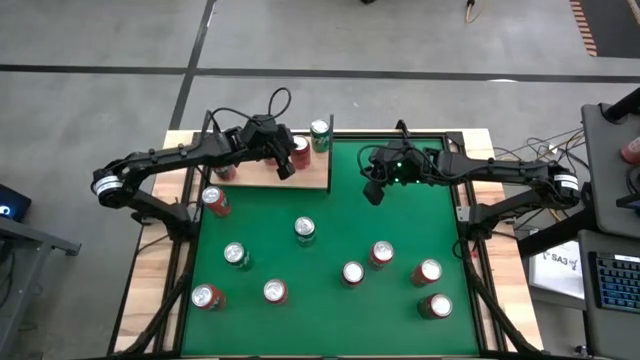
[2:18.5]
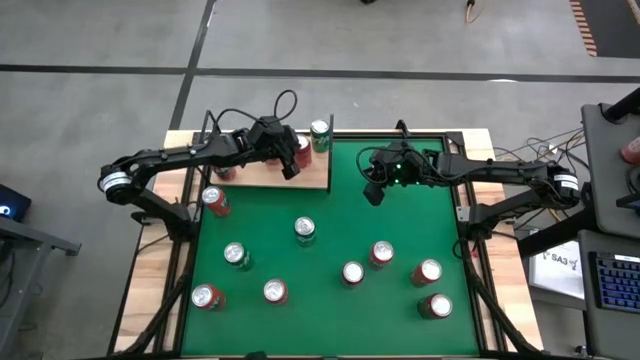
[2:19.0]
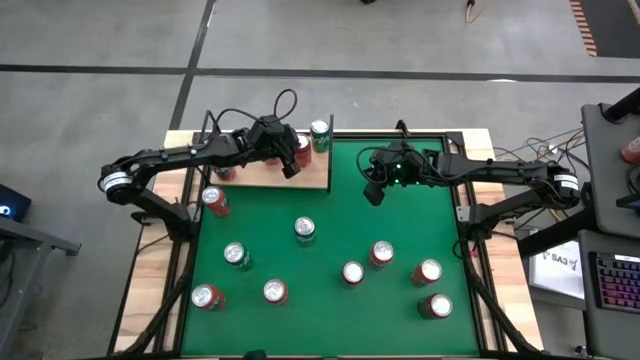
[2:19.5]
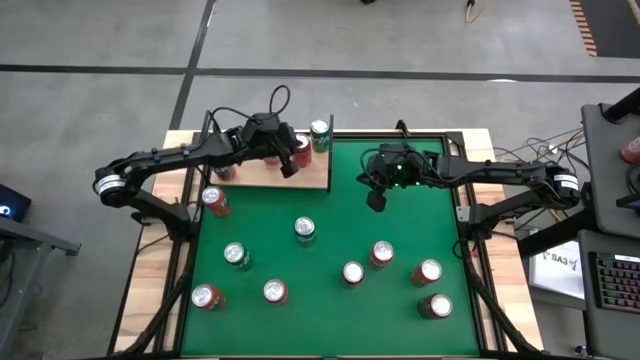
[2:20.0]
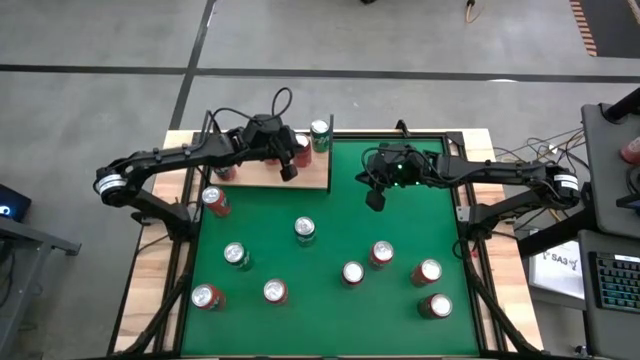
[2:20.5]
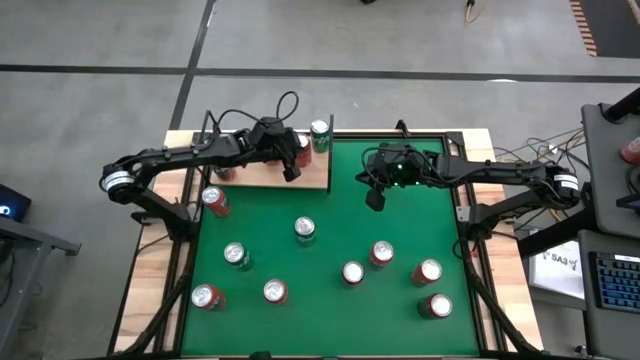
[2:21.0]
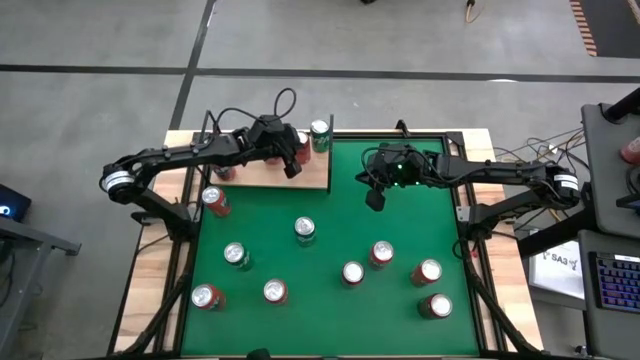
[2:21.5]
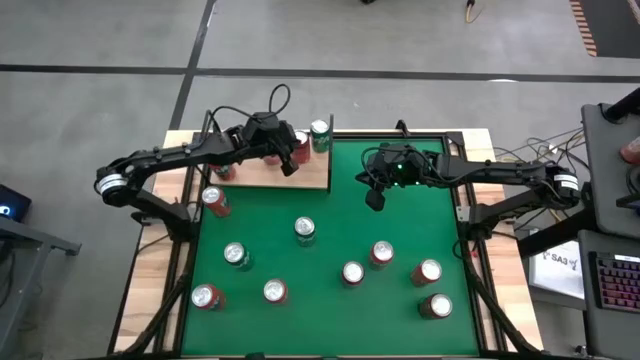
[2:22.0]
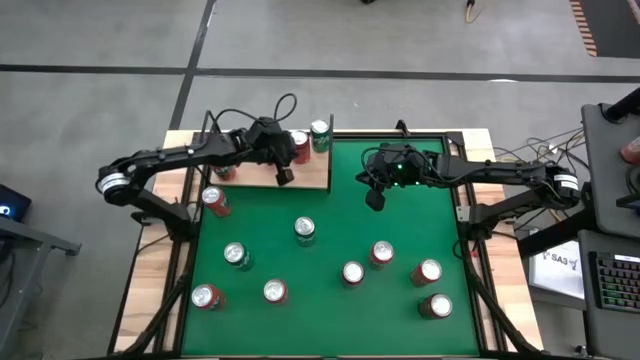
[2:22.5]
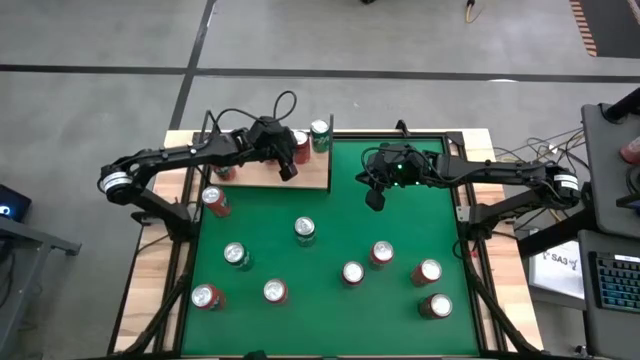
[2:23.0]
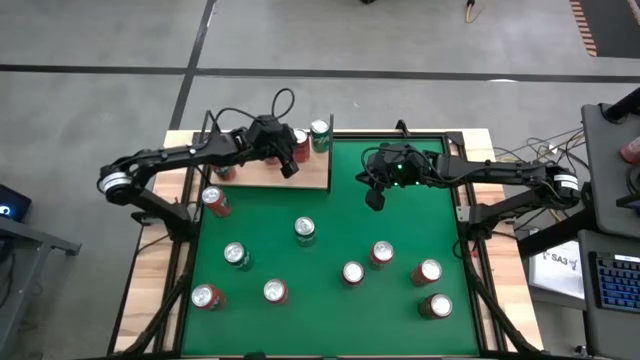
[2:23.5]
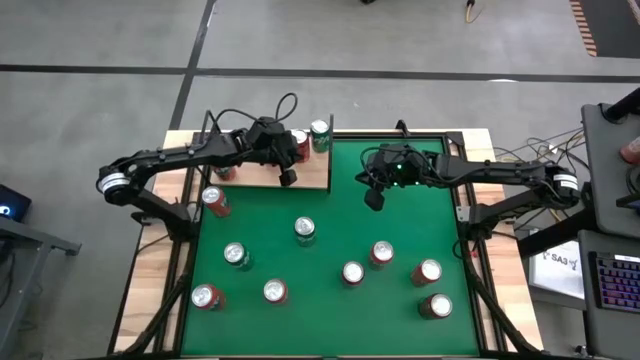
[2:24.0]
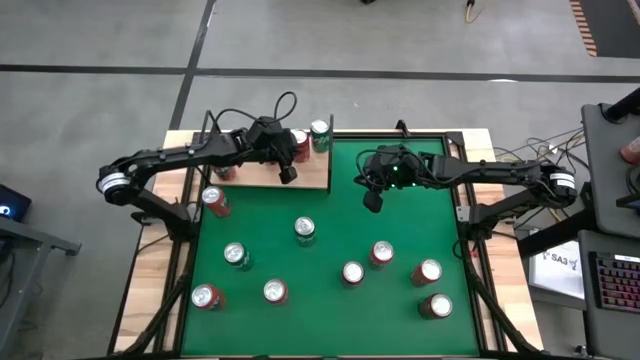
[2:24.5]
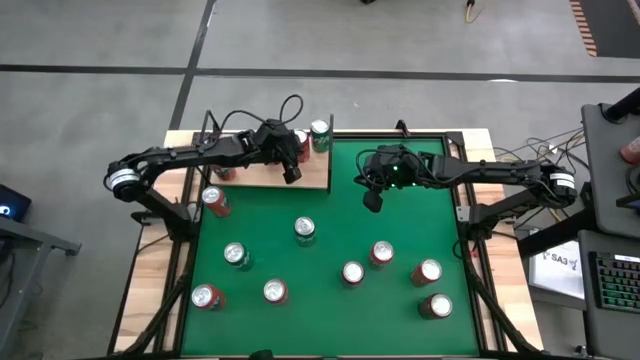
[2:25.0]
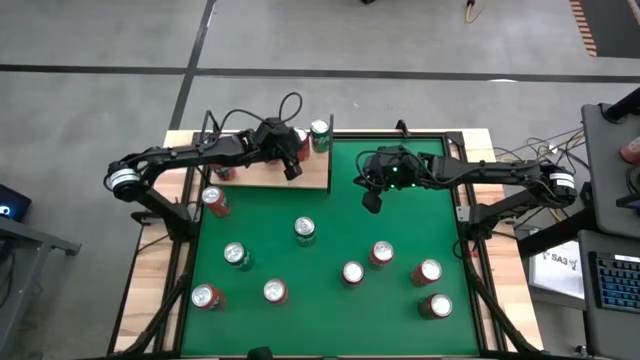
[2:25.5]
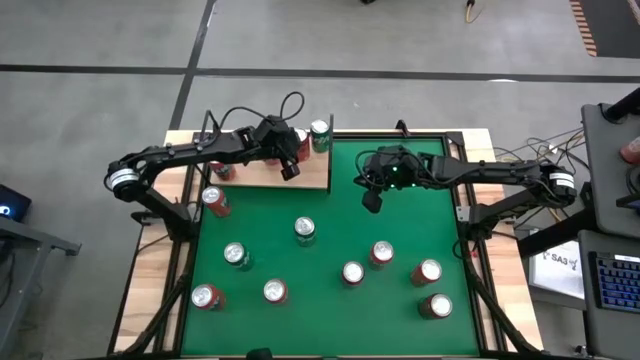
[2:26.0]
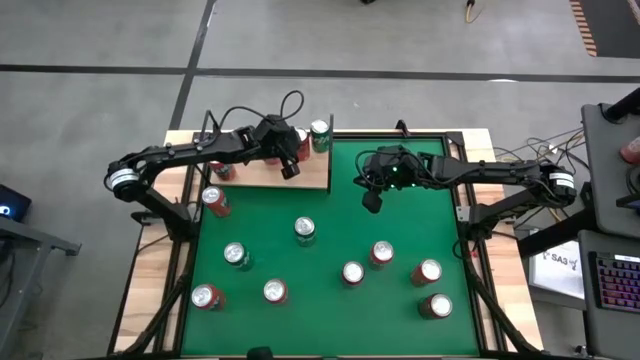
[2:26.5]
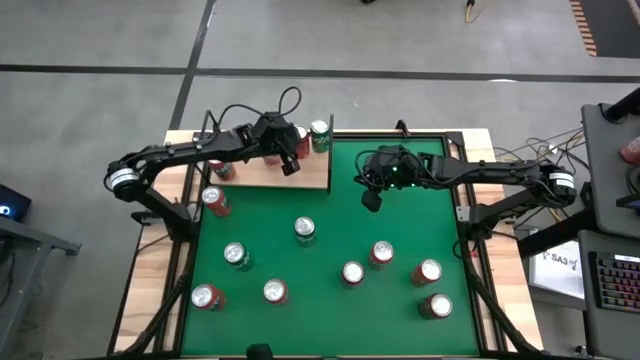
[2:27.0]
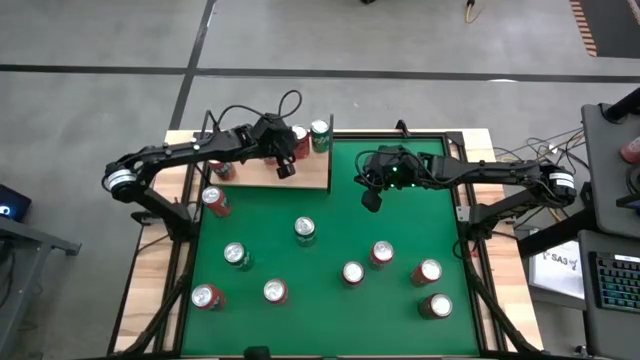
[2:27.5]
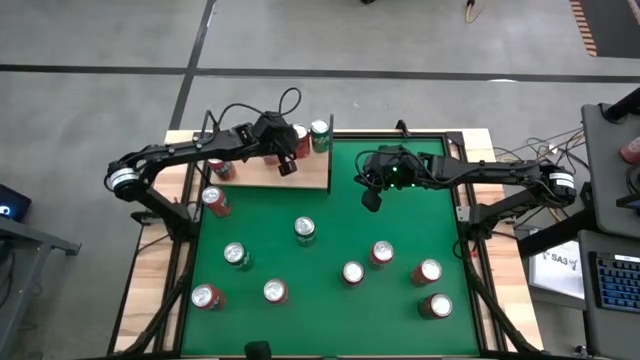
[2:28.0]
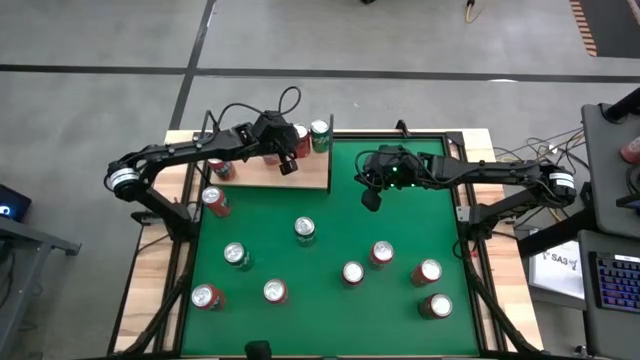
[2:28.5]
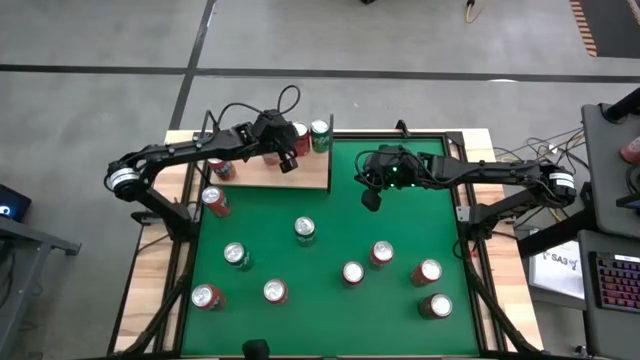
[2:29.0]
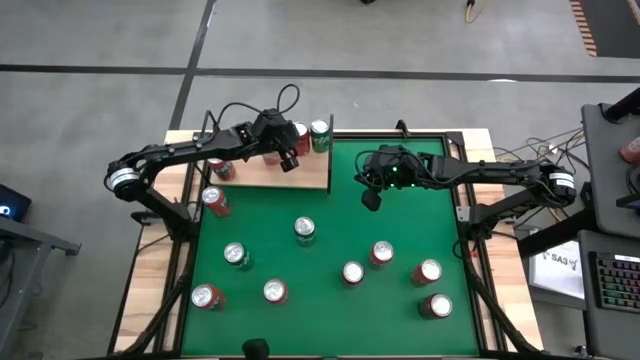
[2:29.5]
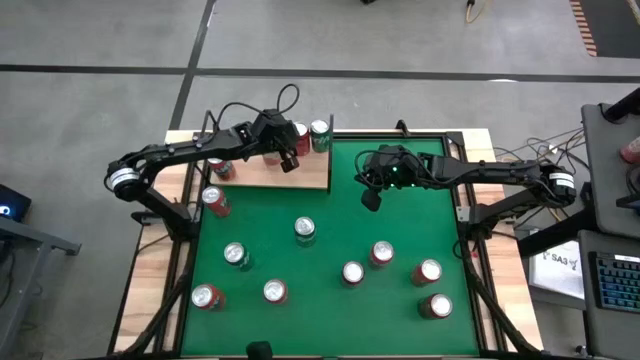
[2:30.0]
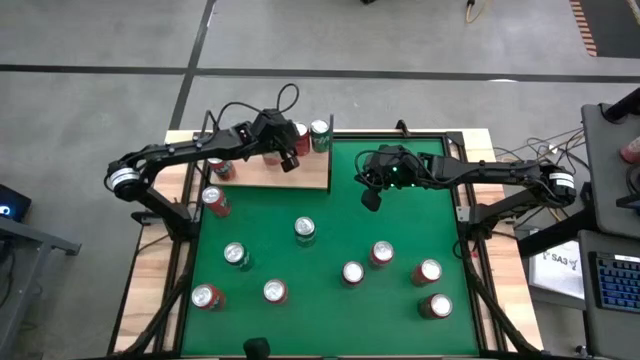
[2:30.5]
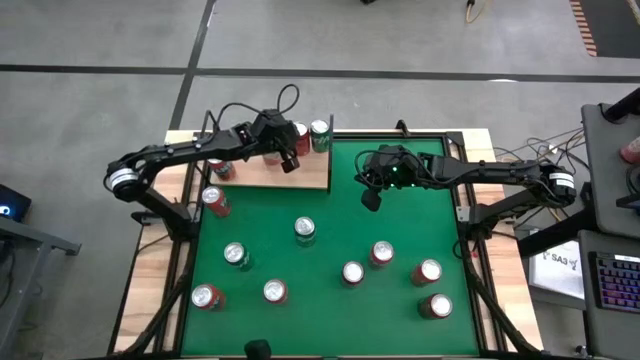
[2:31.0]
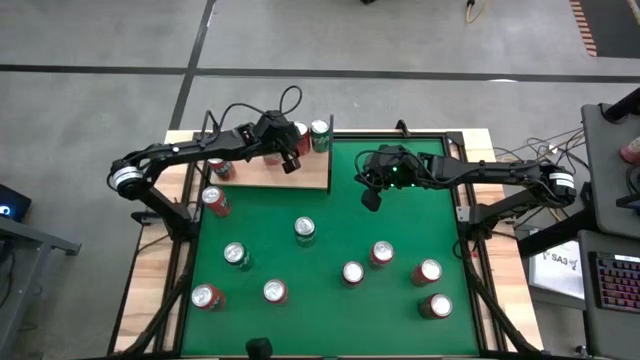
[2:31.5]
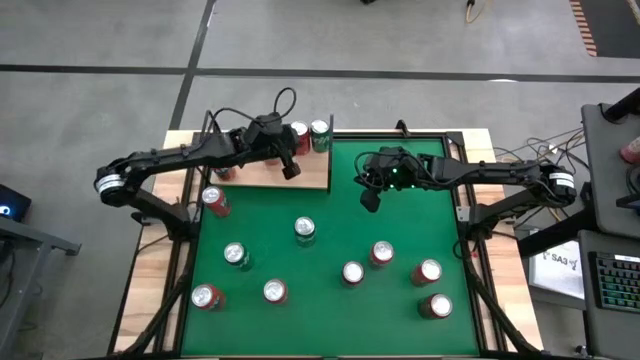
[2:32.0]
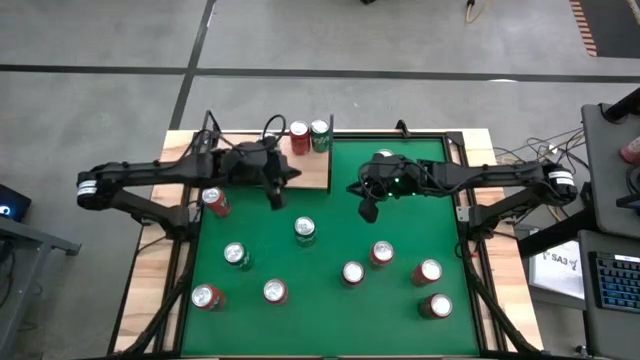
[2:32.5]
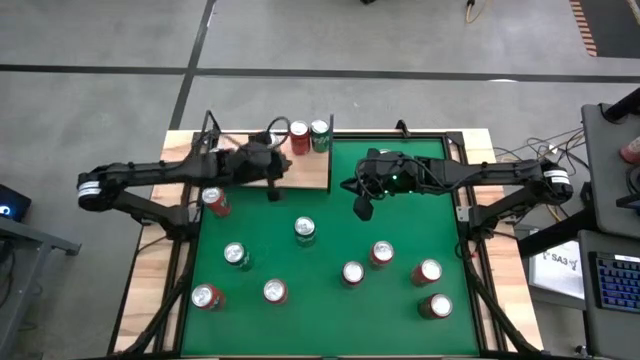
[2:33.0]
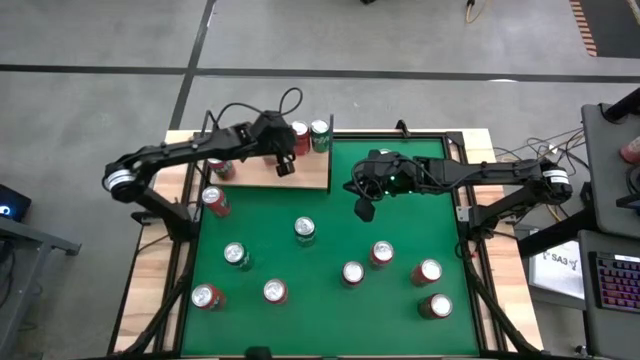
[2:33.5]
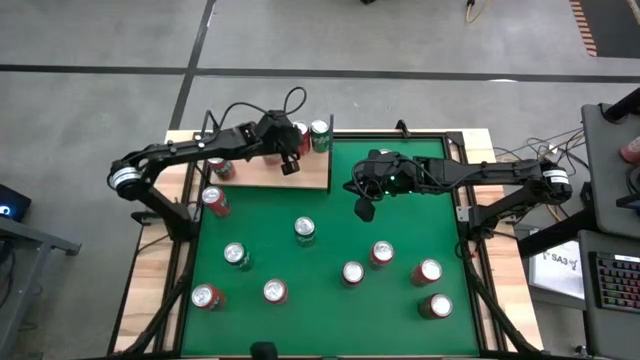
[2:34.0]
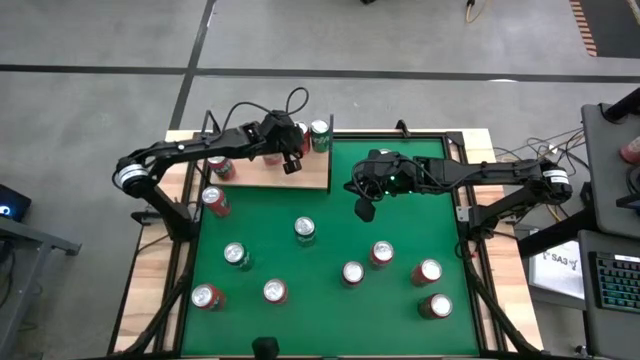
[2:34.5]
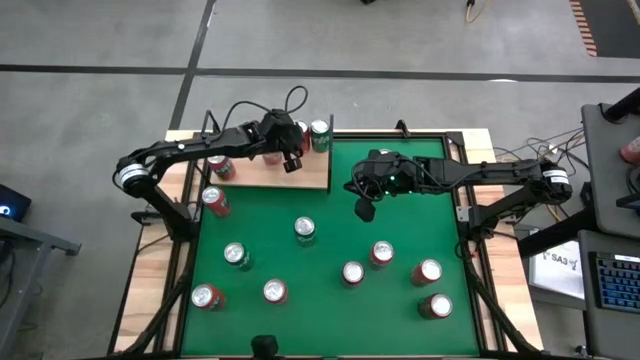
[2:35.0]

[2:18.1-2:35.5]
Task: Place canned beverage on shelf
Put the red-black soda can on the shelf
